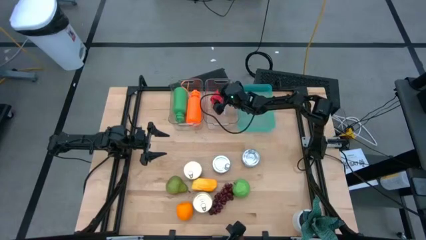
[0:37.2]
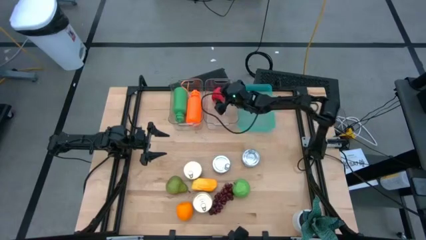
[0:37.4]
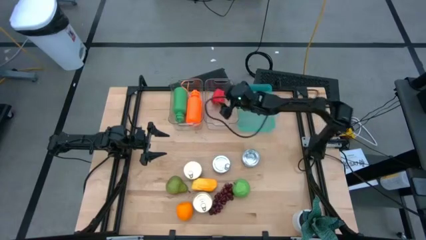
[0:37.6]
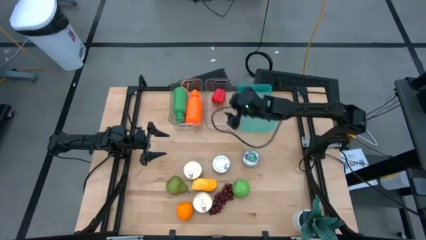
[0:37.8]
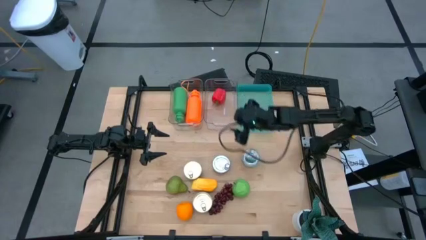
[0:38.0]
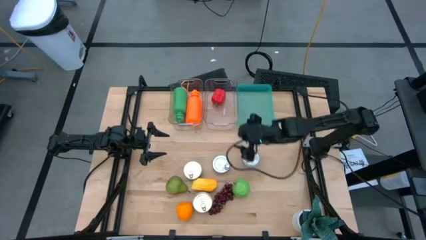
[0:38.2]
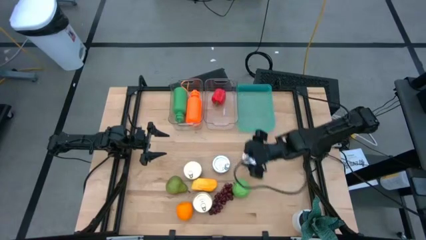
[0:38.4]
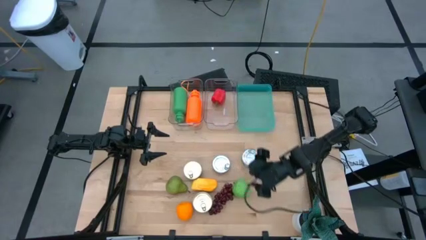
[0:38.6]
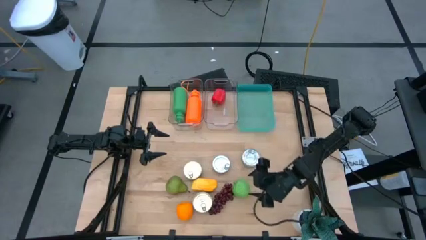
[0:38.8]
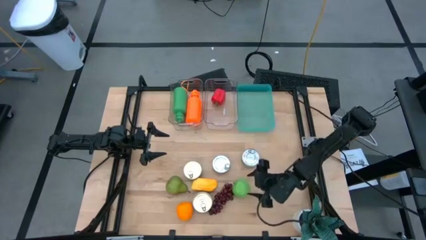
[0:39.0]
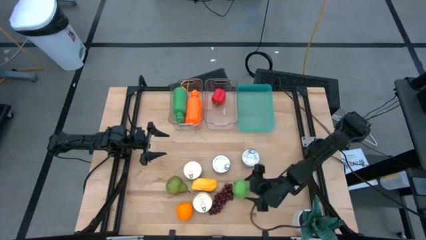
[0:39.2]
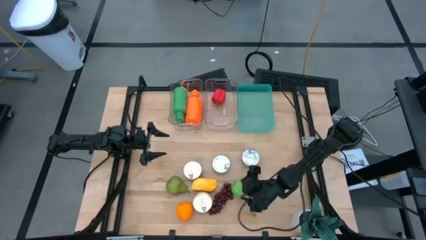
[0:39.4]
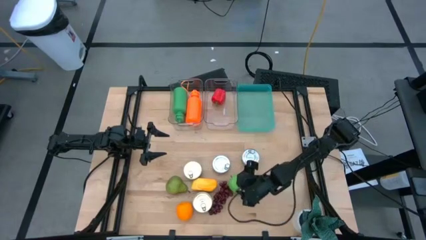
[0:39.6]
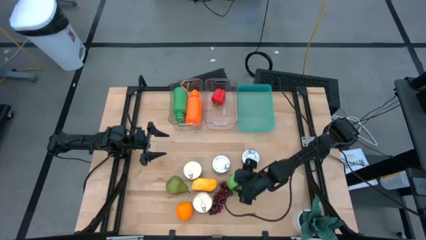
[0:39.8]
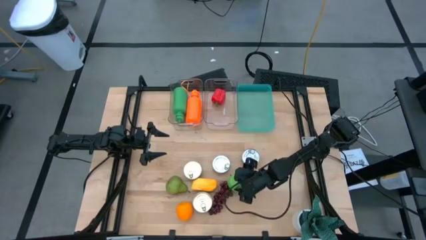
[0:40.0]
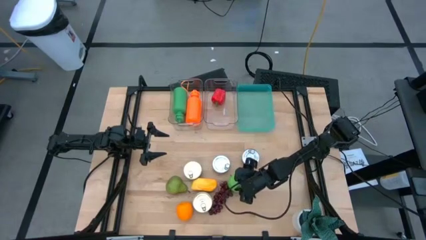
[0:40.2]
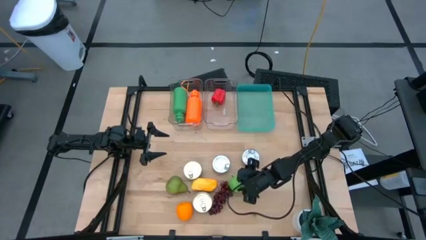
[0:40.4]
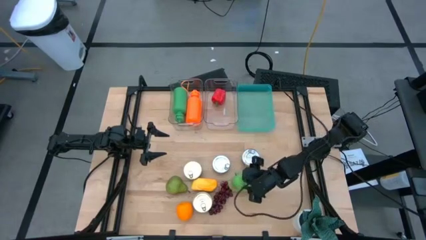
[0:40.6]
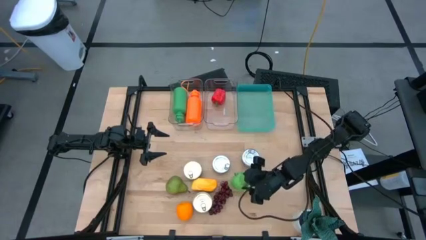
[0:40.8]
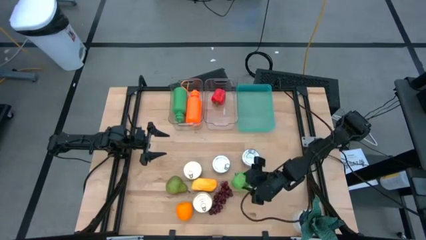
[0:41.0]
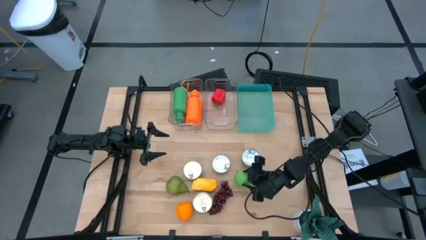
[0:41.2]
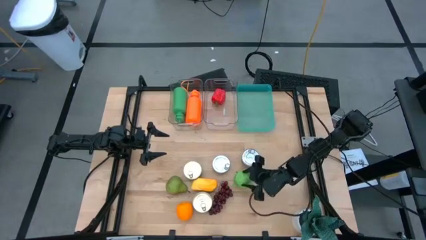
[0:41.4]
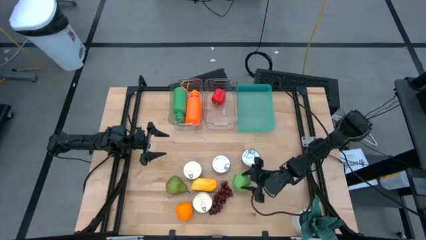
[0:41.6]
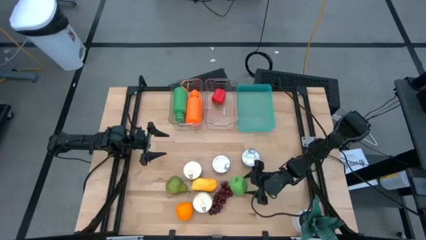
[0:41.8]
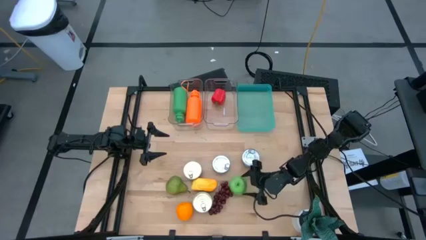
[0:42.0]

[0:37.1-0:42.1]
Task: Pick & Place Food Item
Put the apple into the right transparent bin

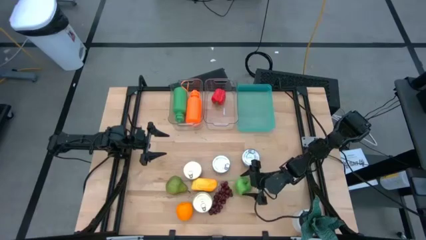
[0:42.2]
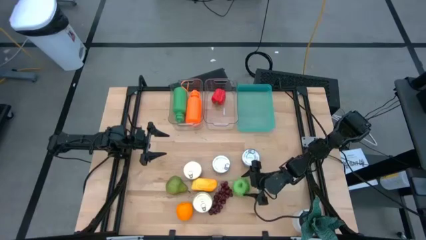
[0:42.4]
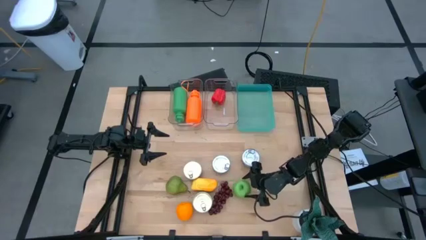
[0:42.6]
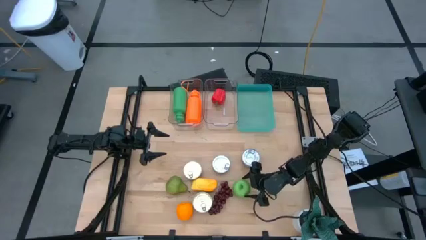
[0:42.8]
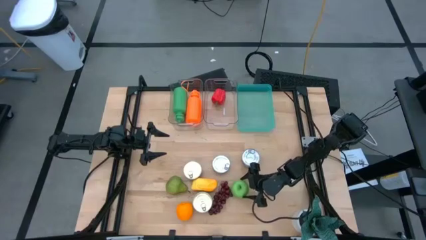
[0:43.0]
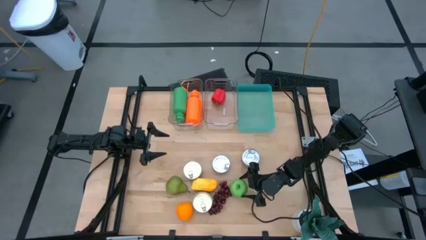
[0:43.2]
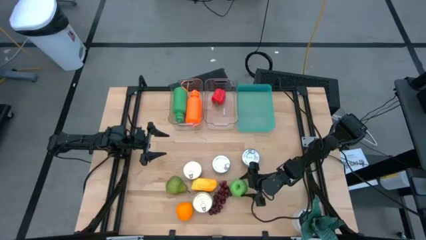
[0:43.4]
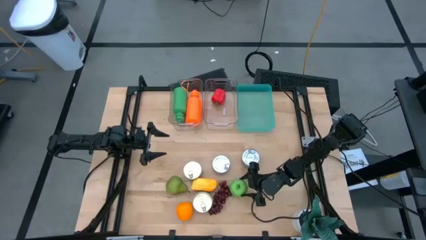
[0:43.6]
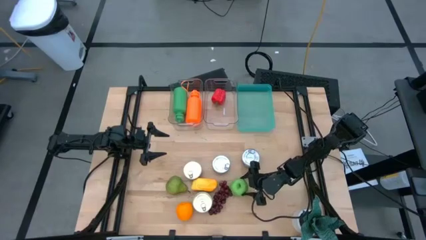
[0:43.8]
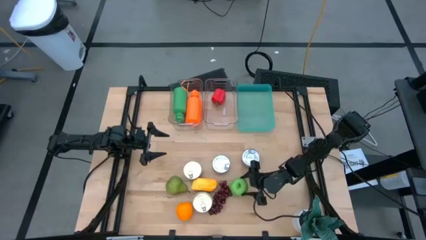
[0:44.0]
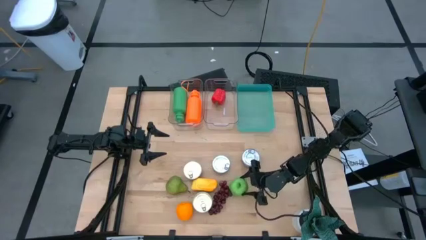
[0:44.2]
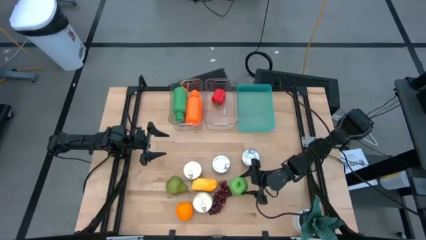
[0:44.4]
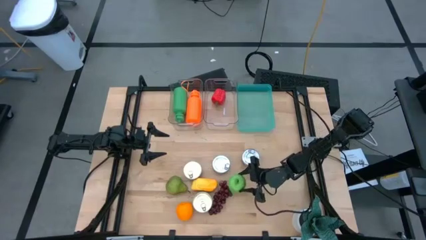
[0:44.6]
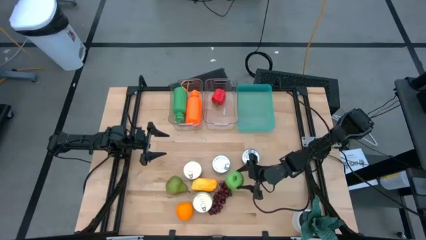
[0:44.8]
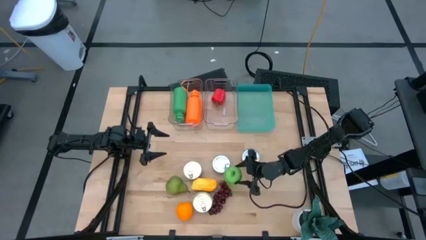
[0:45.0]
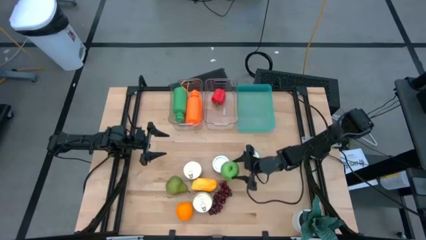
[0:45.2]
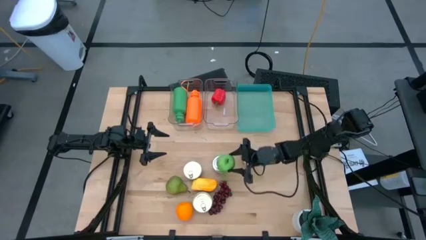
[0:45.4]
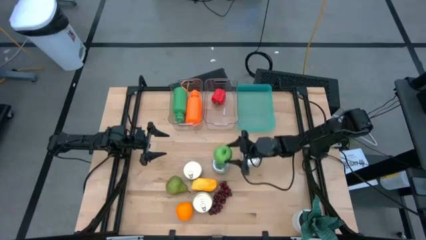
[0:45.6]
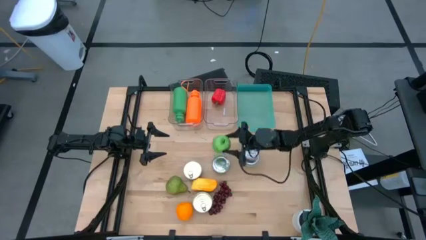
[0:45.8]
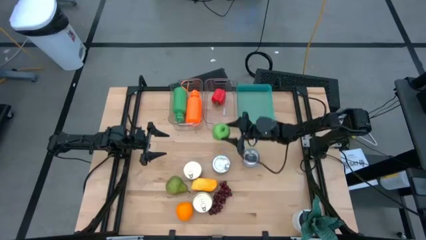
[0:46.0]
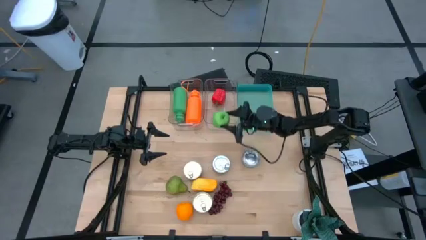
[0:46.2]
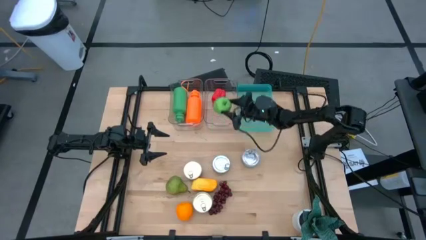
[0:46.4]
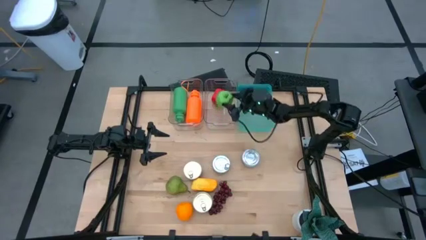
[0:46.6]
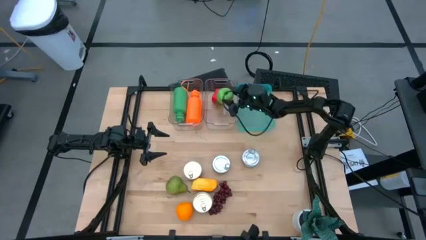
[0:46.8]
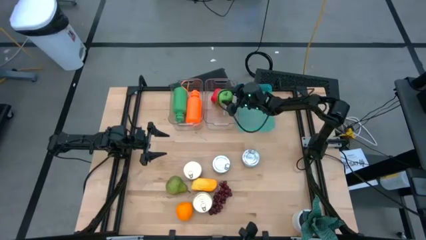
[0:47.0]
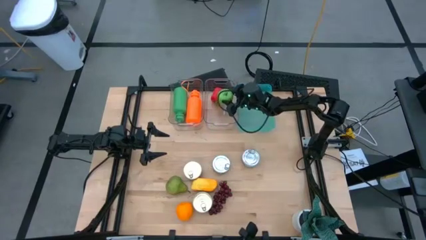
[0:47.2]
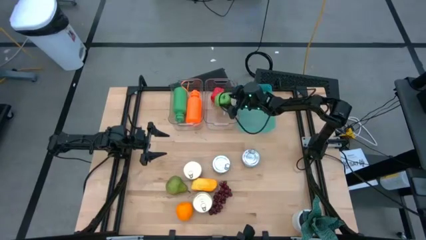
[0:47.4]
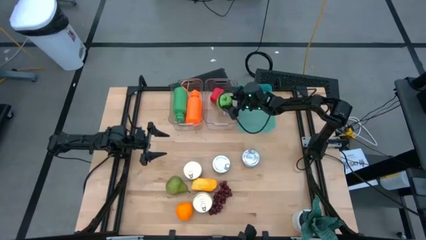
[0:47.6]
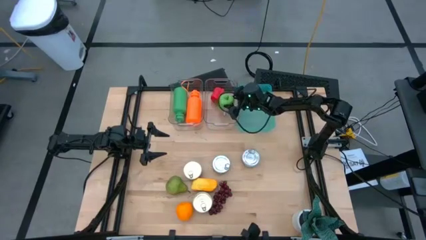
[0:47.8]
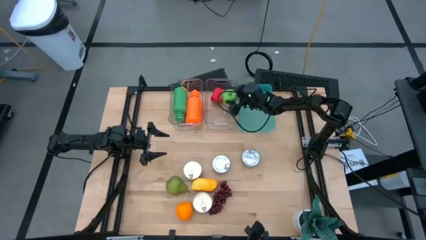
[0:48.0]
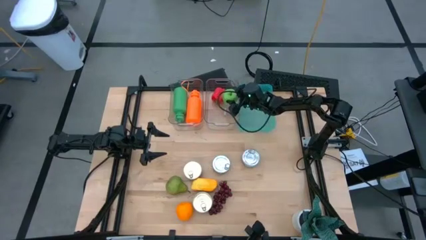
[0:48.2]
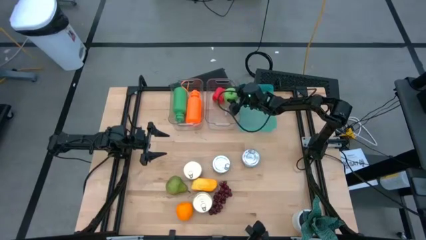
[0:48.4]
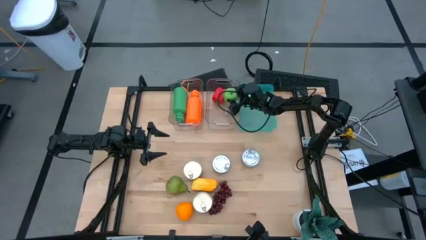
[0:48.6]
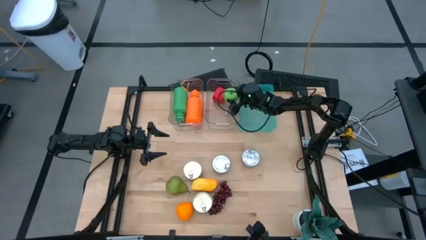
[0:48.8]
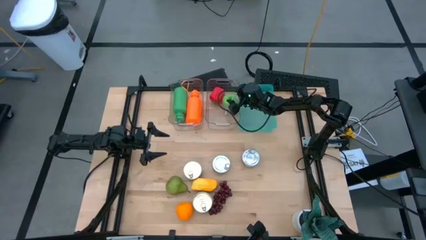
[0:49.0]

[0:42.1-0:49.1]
Put the apple into the right transparent bin
